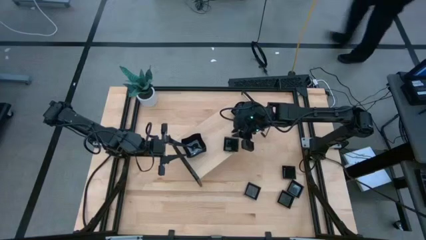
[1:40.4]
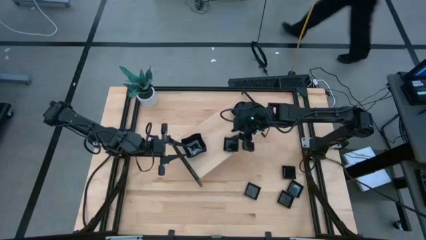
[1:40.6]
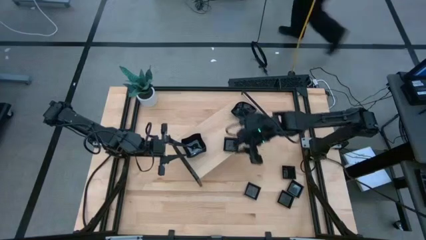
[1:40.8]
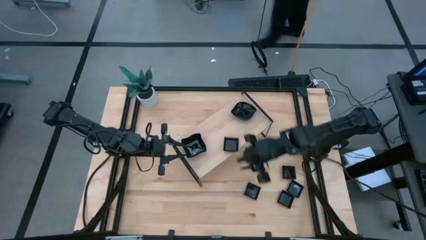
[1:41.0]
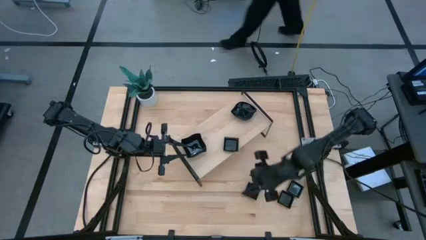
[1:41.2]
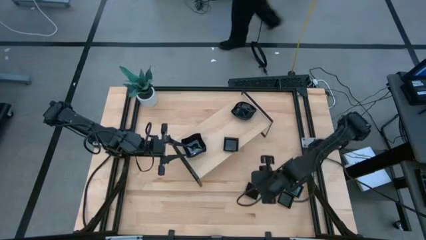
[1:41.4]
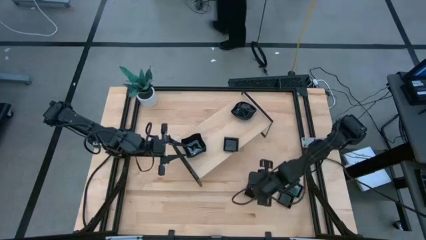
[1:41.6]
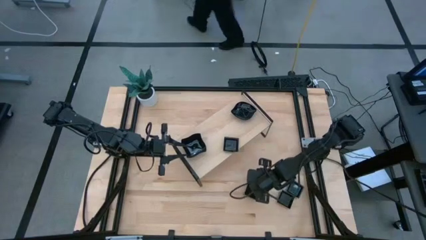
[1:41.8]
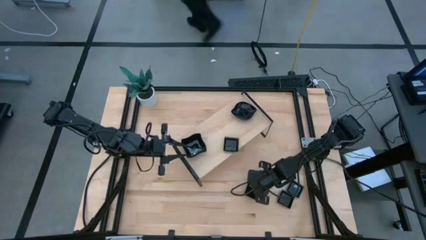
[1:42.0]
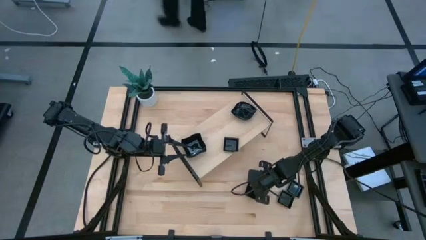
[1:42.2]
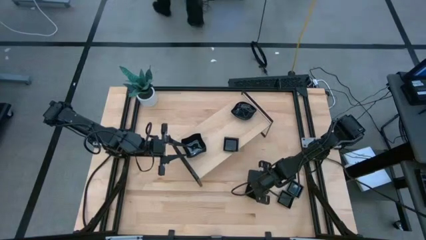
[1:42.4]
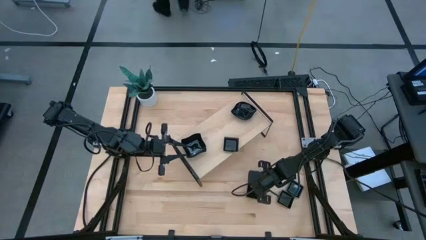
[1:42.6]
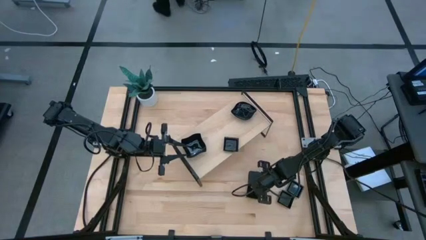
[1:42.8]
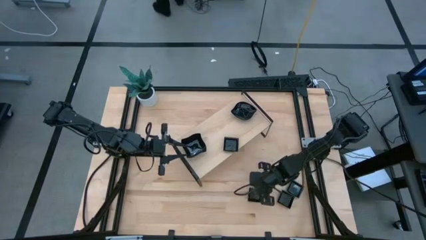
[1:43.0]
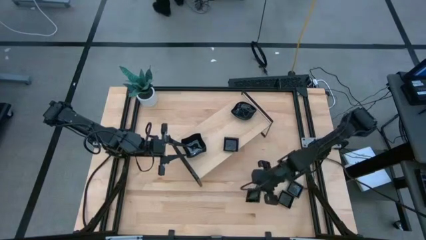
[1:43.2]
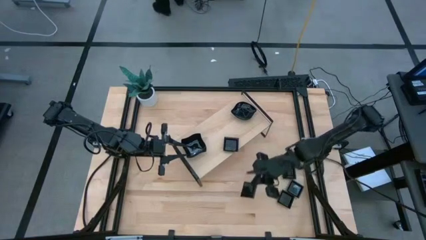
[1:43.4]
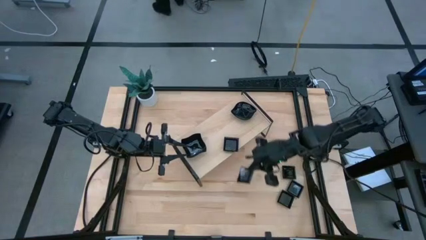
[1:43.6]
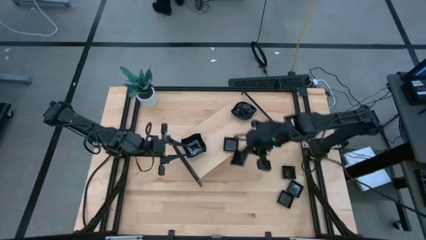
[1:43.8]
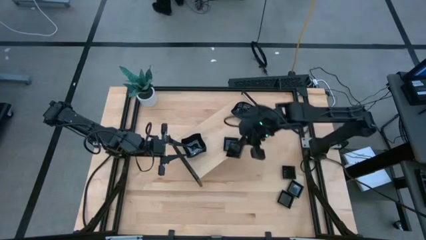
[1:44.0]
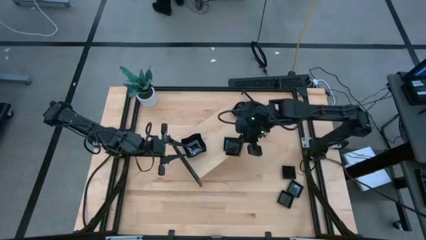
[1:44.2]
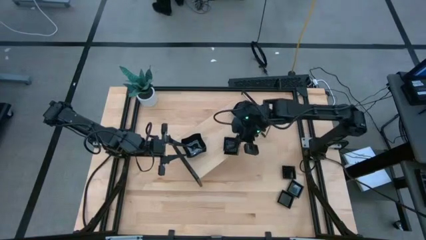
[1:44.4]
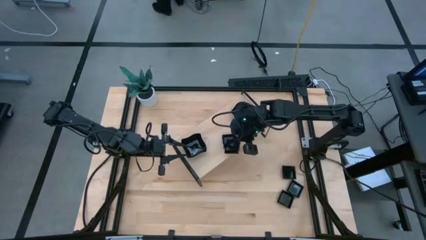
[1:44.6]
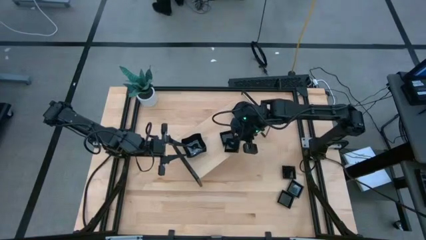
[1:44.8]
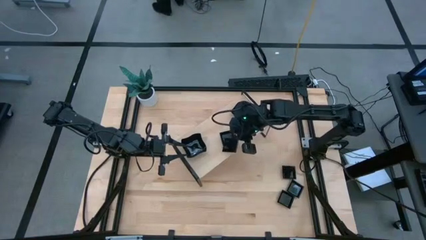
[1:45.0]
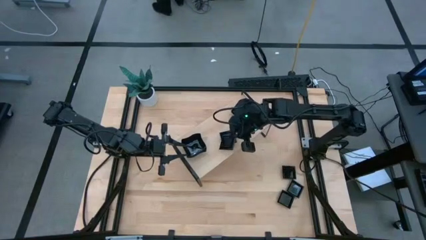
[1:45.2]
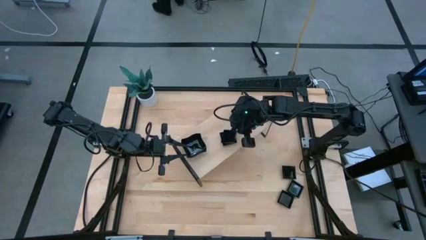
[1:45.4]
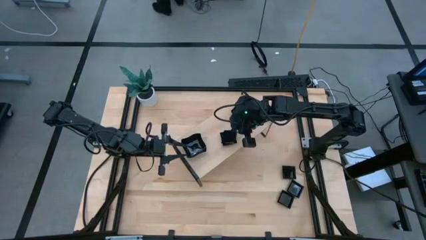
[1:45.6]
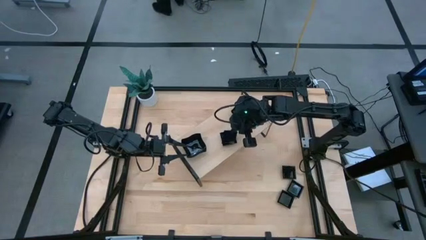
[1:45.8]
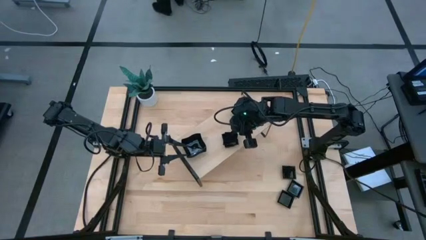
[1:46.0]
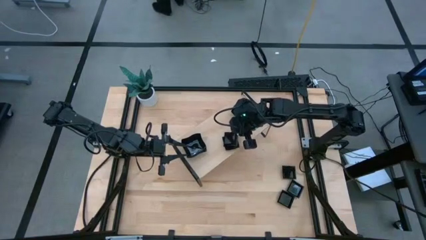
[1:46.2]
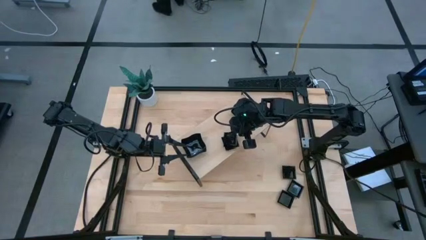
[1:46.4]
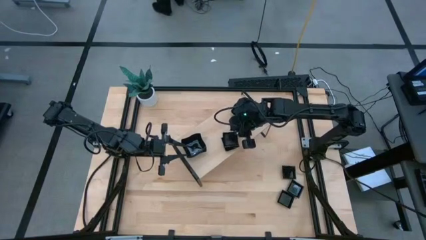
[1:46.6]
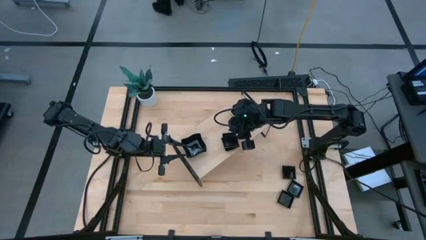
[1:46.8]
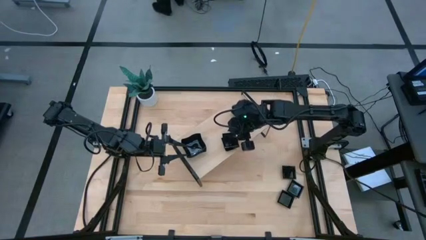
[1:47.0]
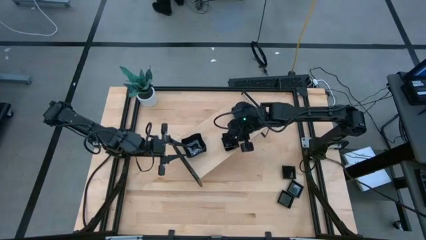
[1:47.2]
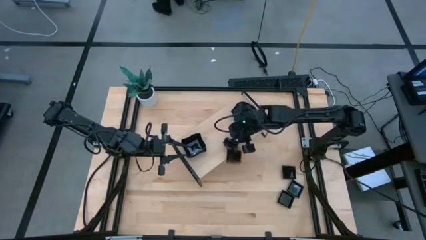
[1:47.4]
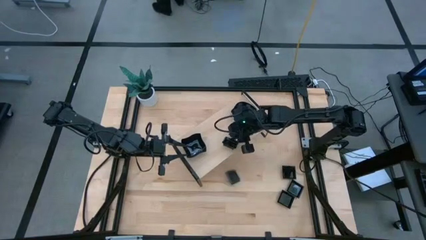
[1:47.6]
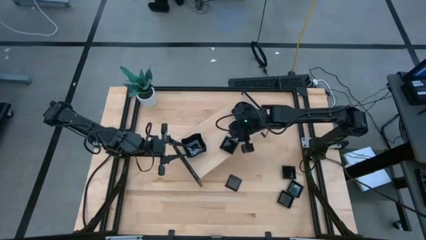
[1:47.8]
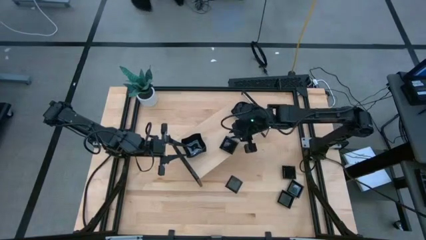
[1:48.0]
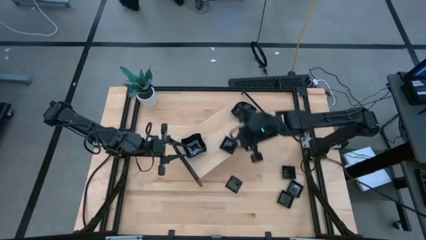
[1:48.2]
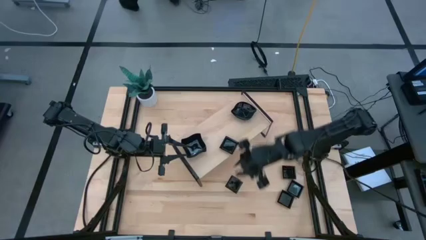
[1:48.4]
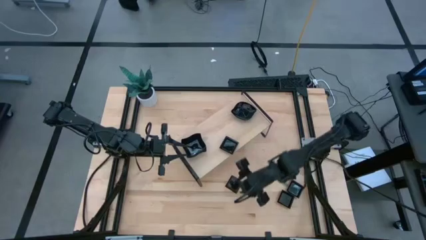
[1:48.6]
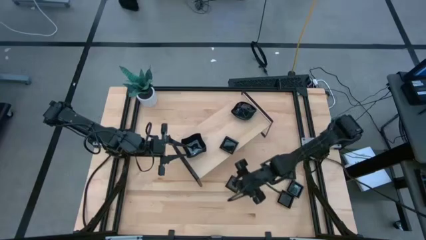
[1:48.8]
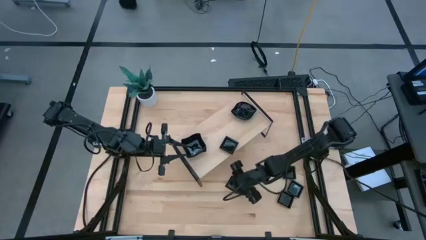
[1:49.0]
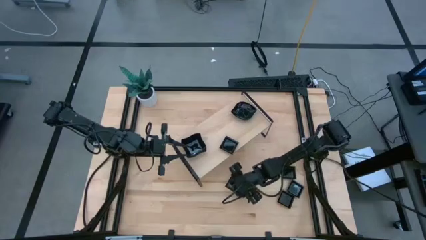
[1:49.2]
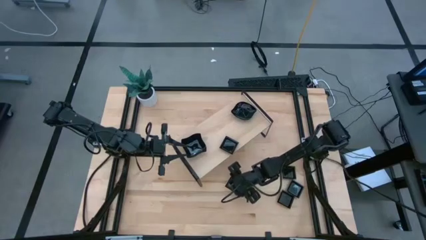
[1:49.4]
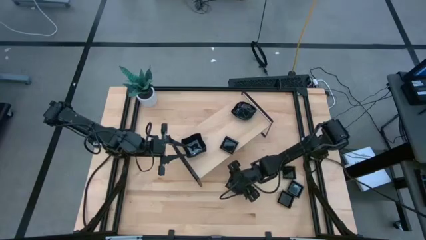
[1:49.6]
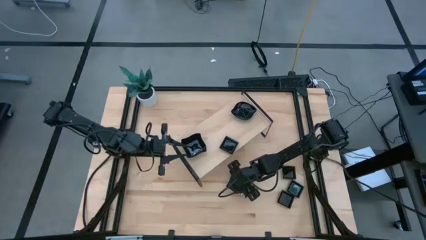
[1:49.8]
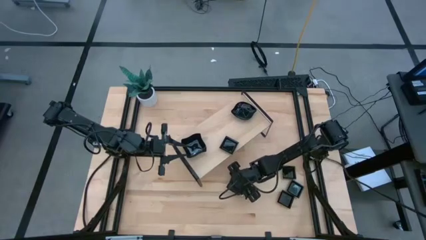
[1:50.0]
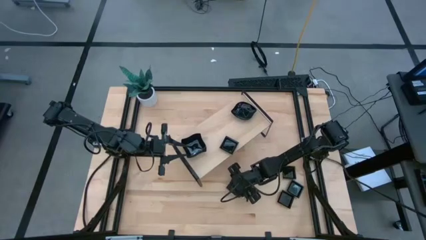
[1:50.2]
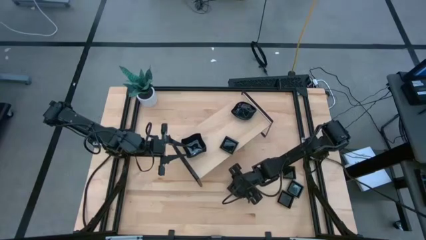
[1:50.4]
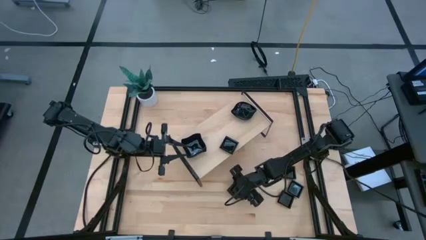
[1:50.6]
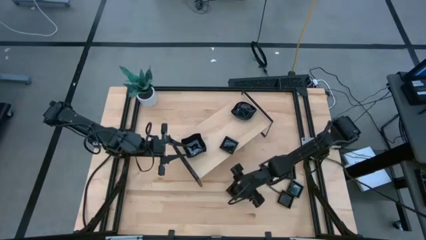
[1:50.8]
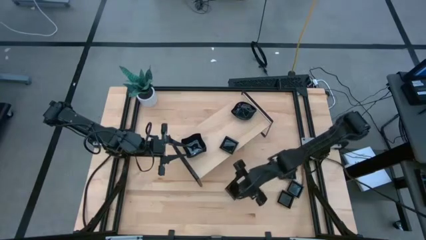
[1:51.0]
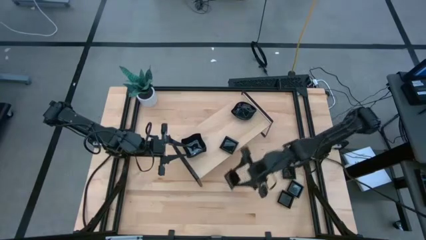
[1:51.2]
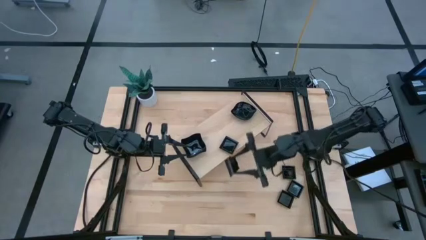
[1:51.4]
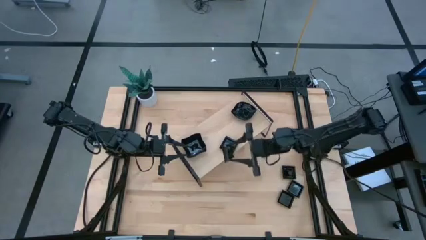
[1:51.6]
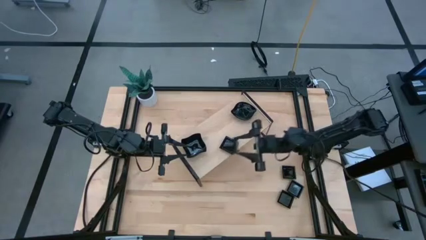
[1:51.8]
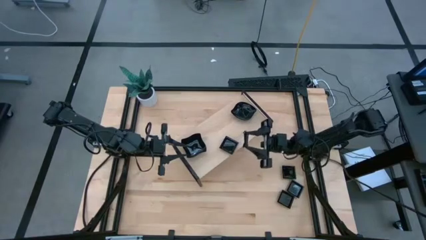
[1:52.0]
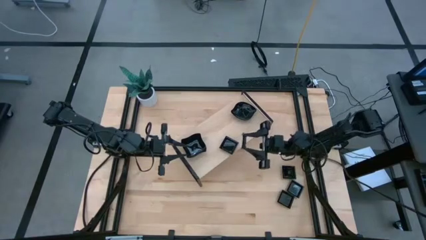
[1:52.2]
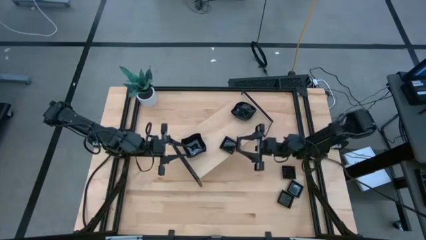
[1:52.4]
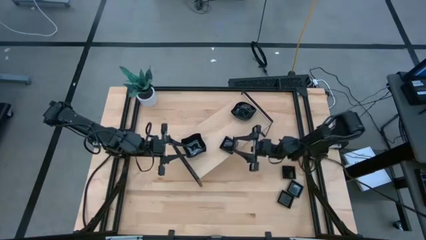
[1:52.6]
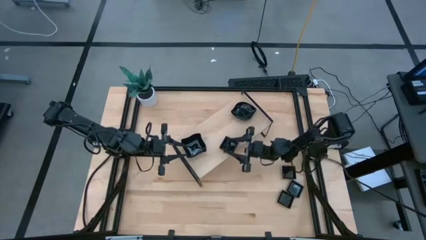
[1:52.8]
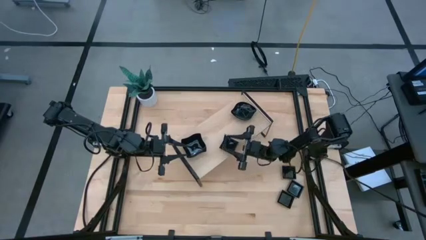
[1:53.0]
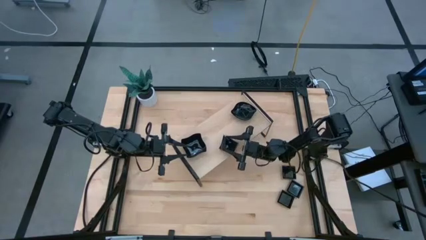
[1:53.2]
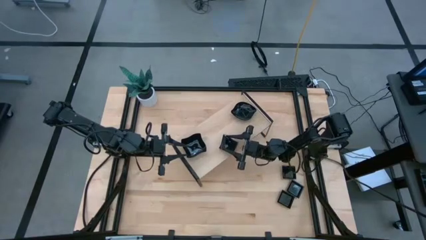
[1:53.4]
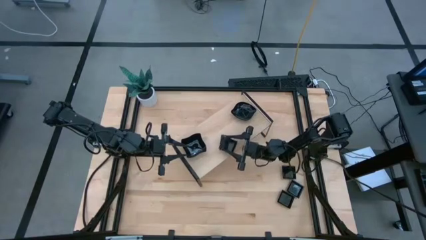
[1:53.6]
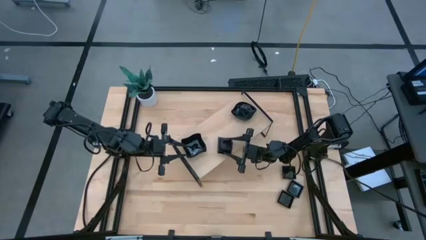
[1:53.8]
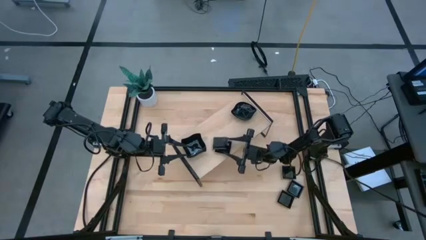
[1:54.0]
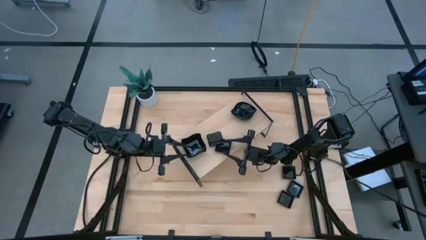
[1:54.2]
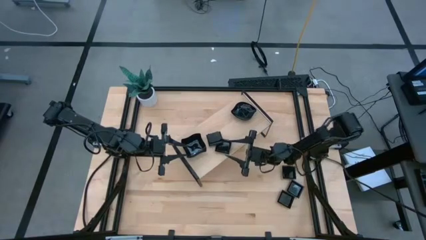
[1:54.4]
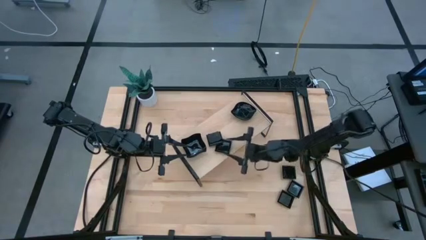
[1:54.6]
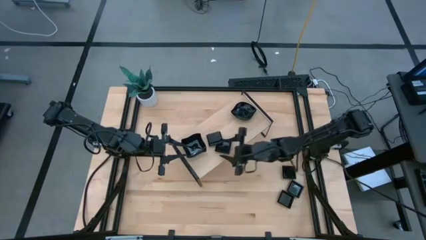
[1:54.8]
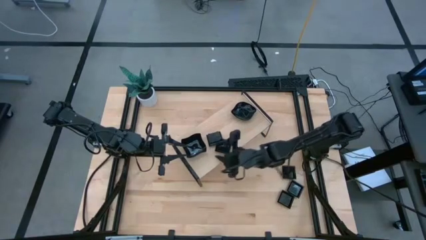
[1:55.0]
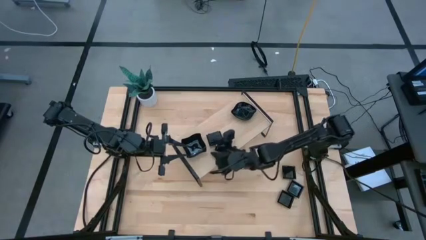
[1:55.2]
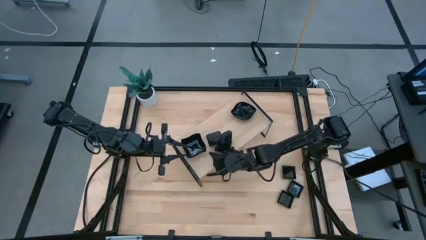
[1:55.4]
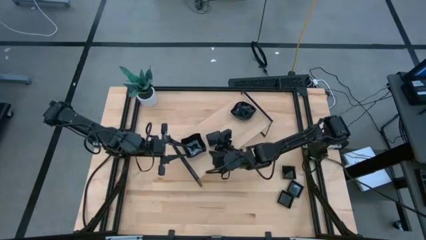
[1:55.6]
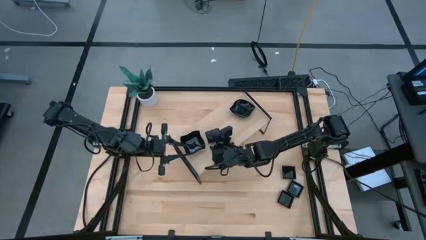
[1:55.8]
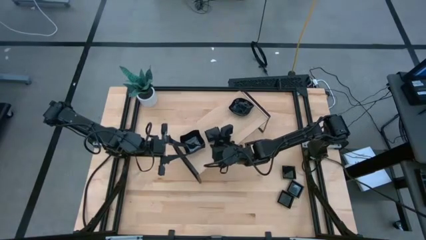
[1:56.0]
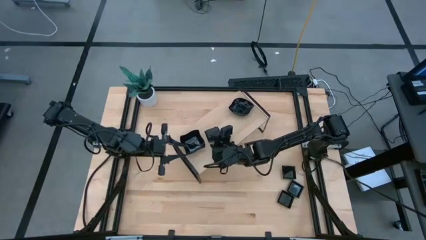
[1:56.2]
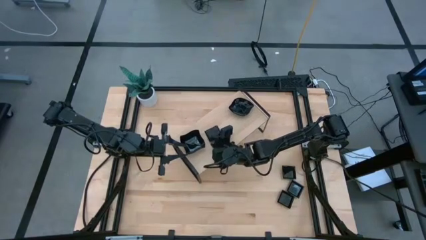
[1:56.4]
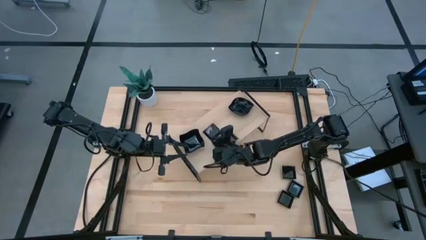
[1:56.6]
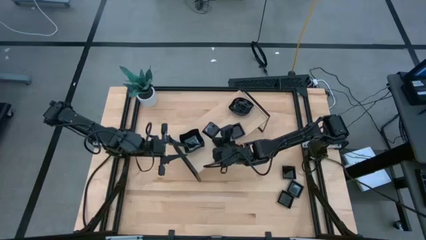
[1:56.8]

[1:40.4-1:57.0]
Task: Pick & Place Mini shaped plates
Stack the square plate on top of the other square plate
